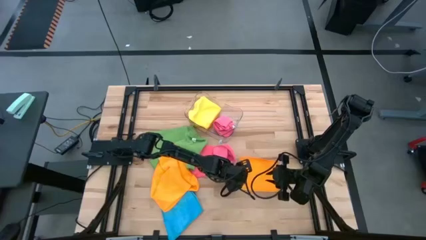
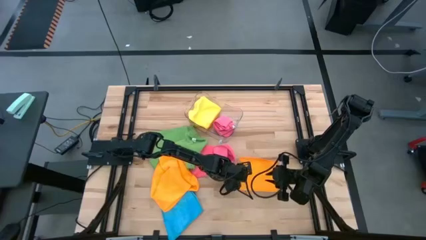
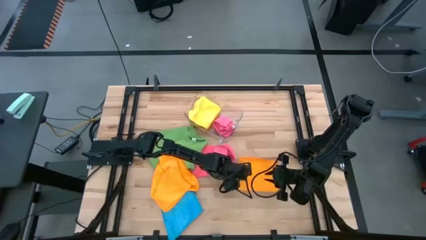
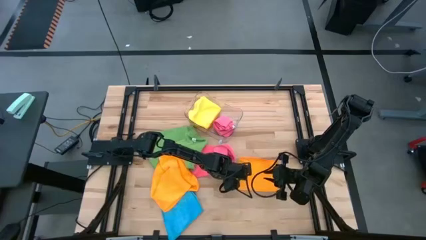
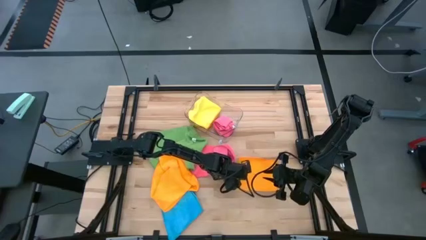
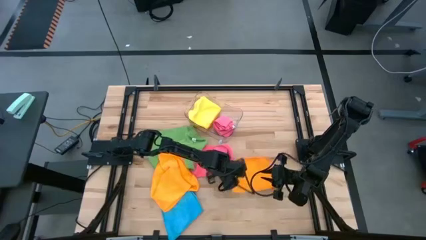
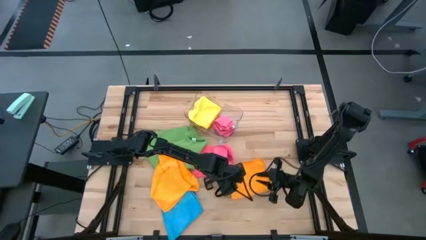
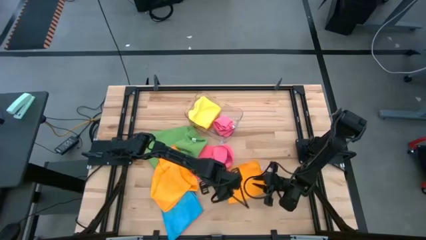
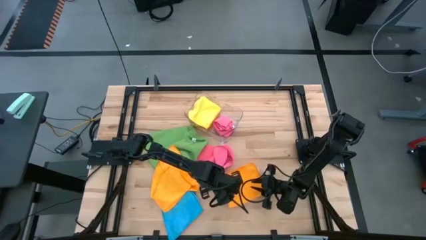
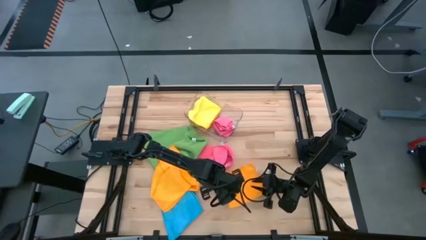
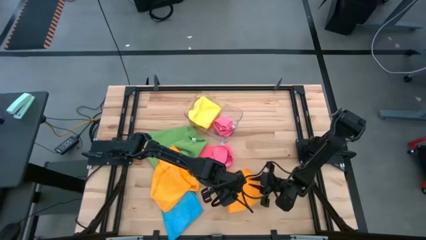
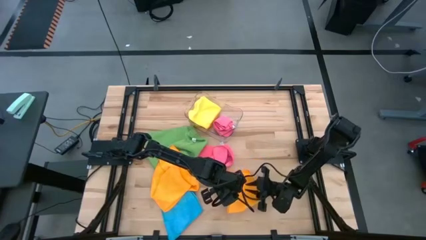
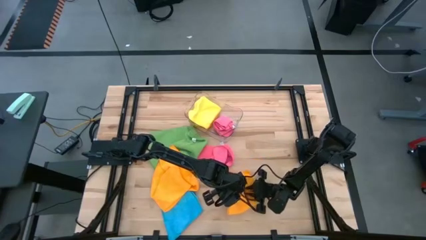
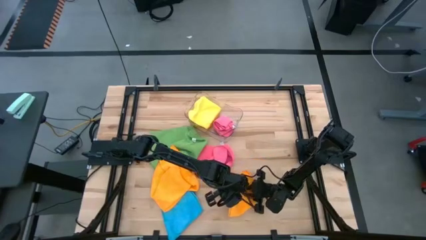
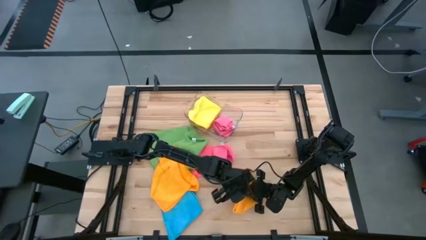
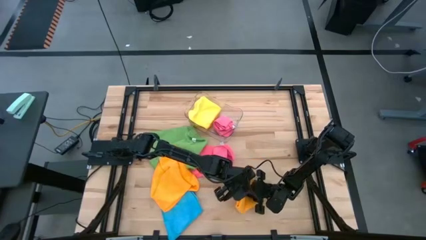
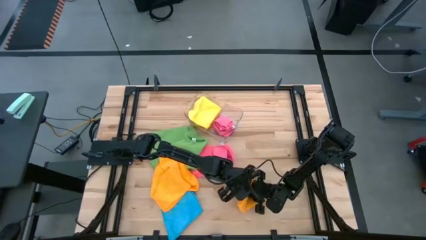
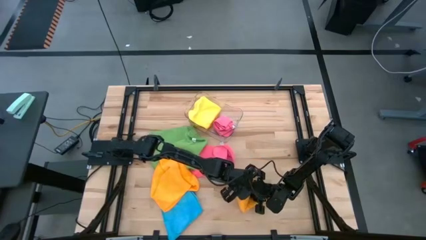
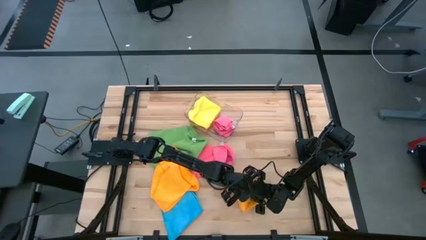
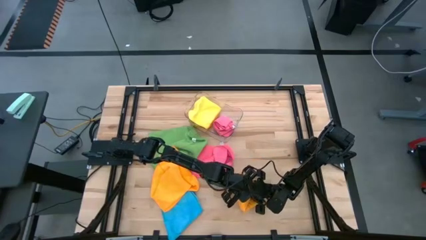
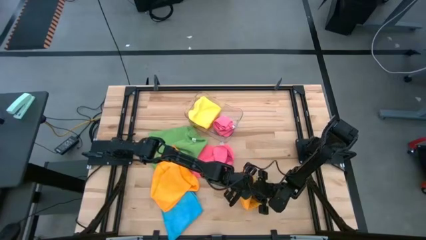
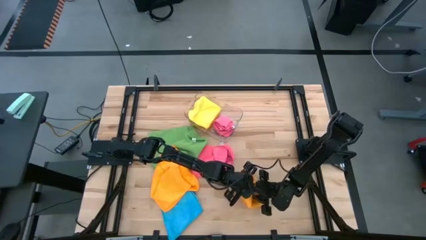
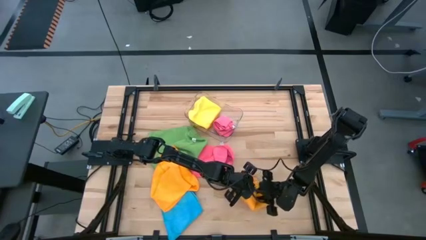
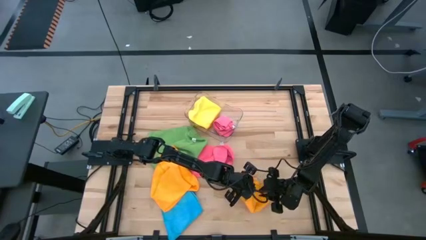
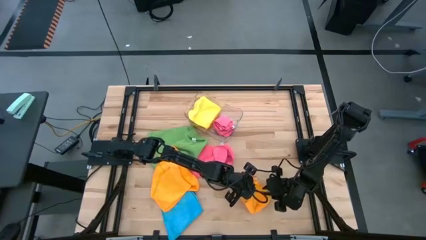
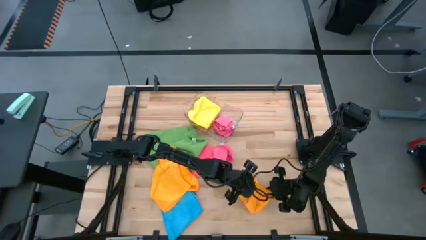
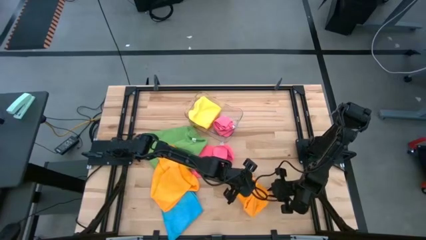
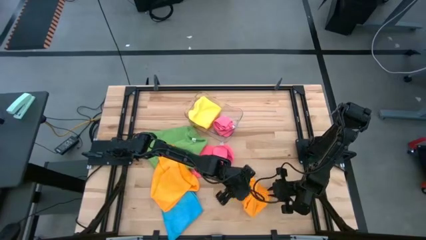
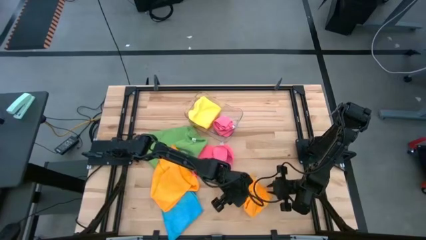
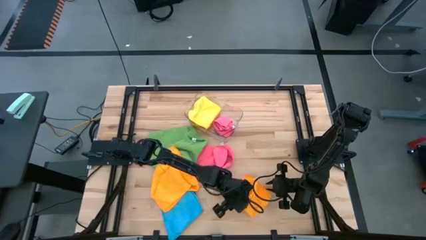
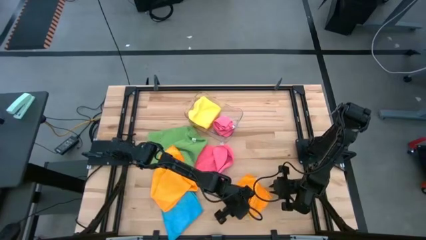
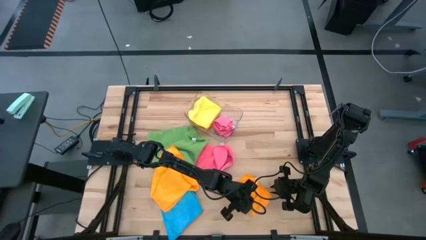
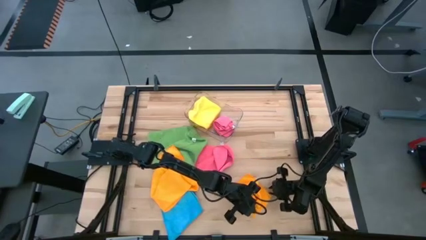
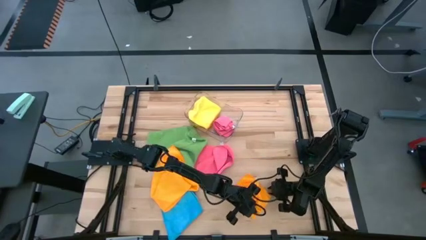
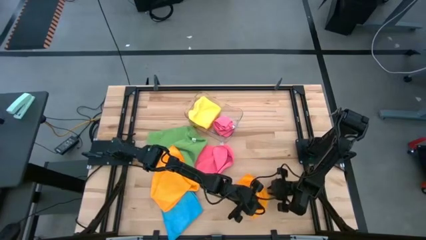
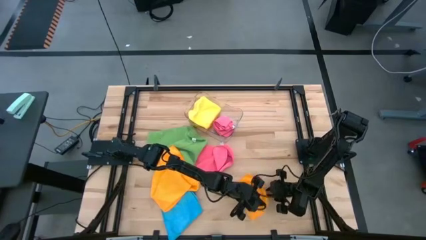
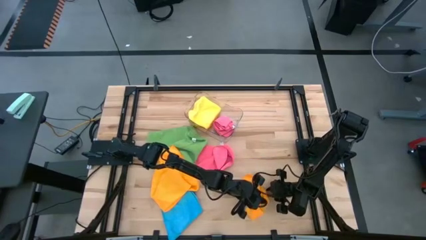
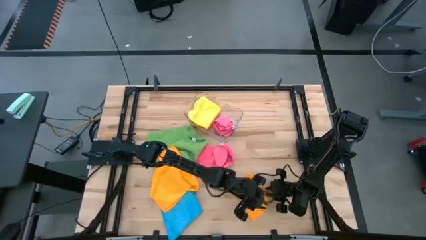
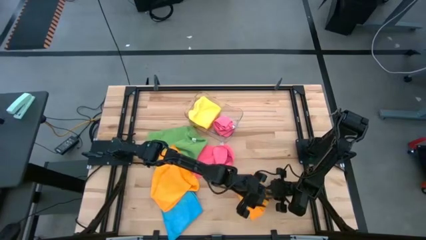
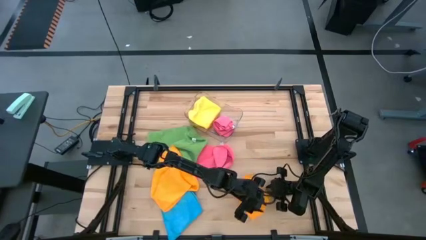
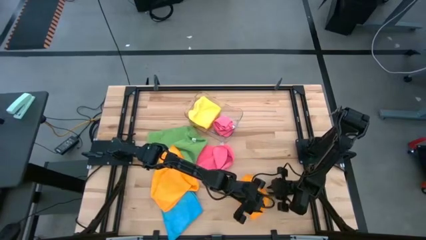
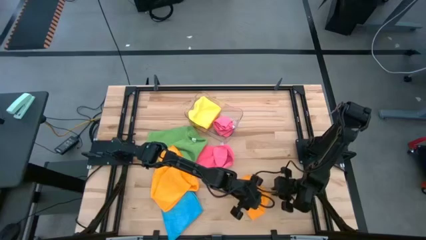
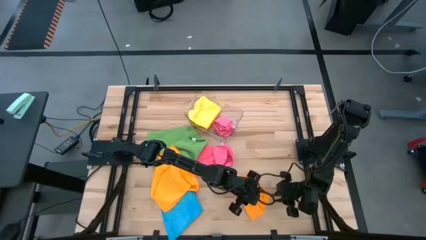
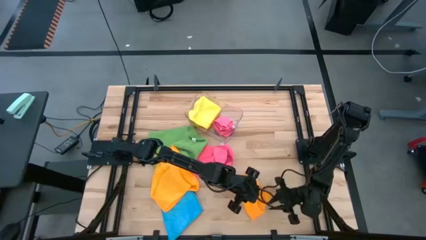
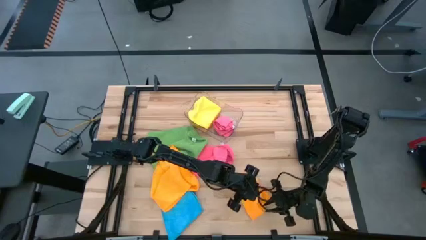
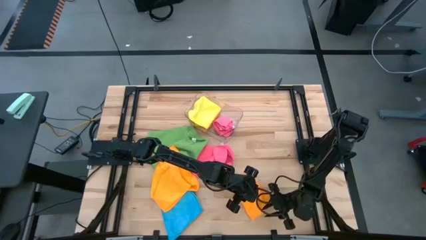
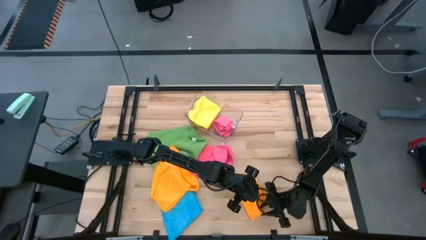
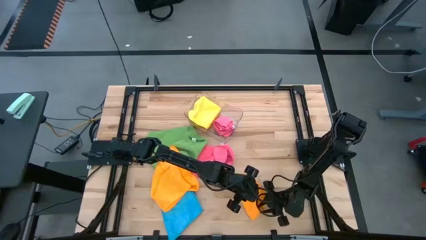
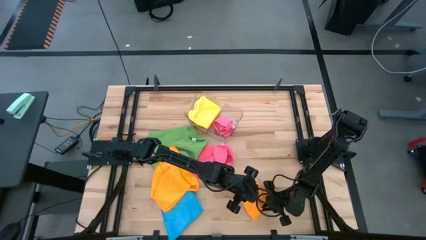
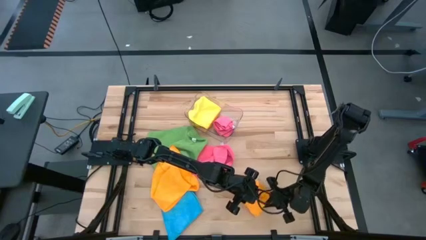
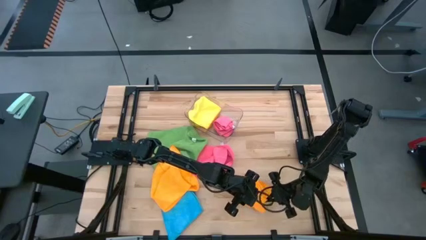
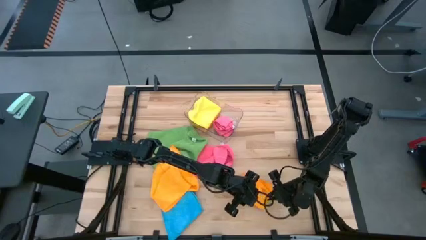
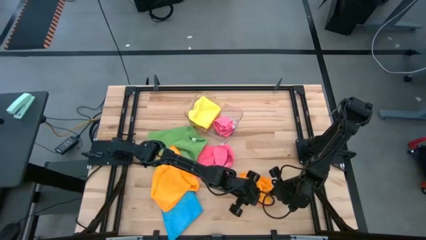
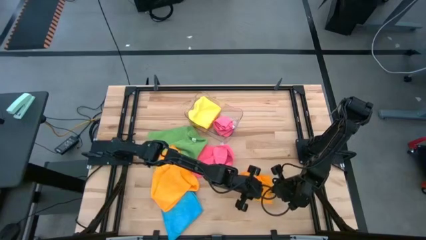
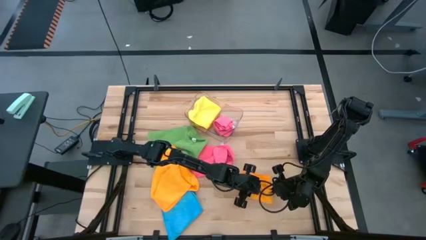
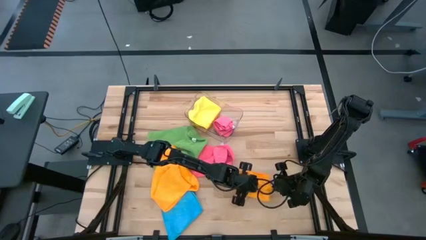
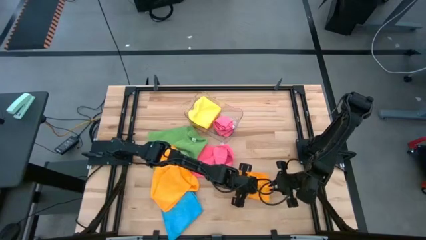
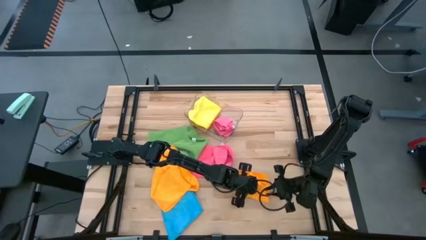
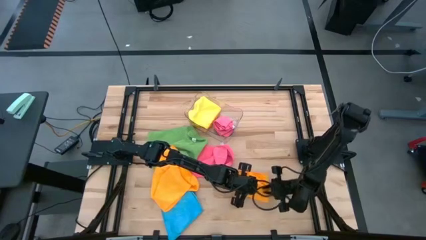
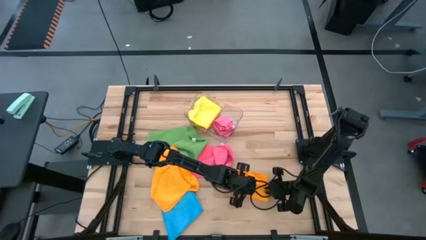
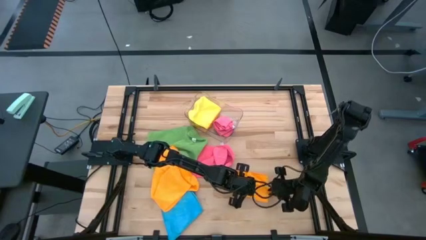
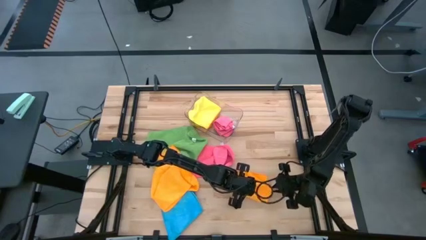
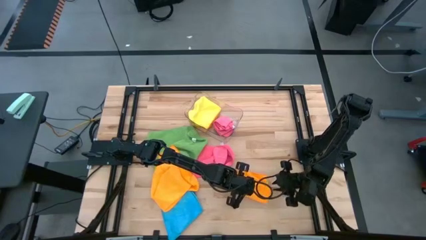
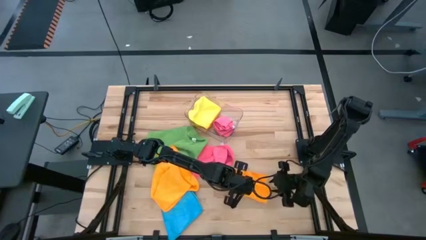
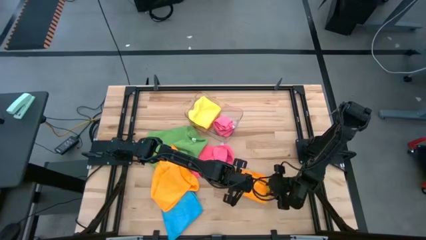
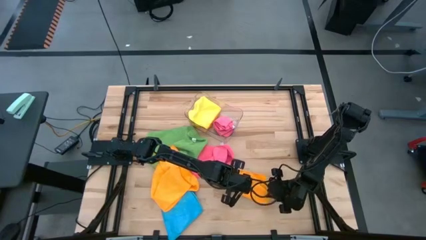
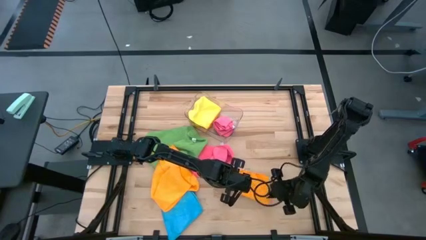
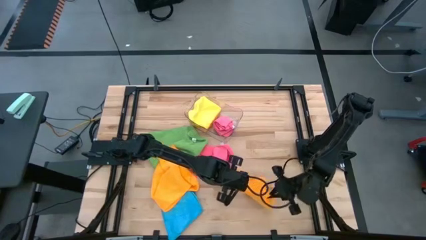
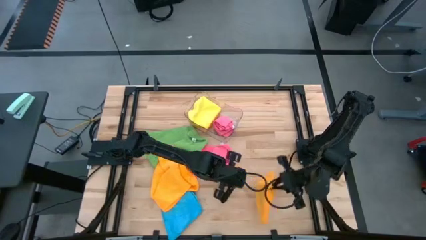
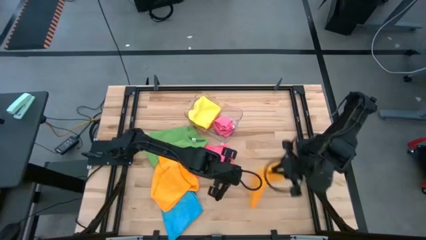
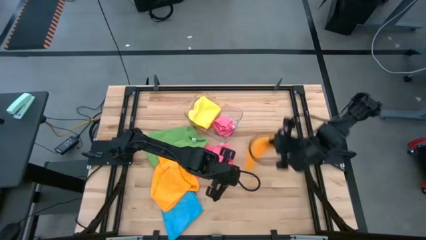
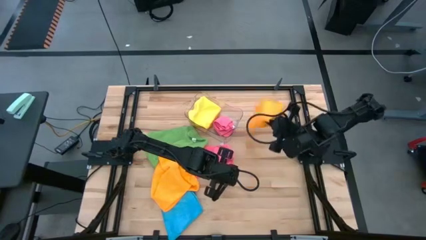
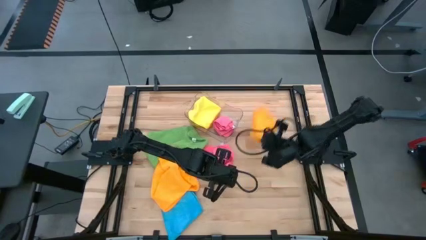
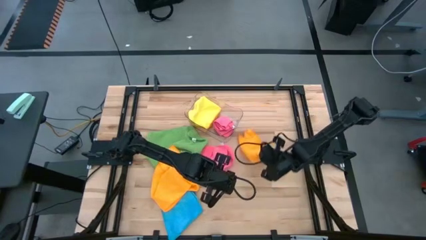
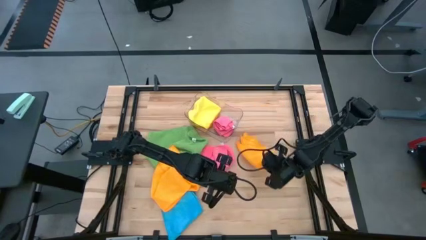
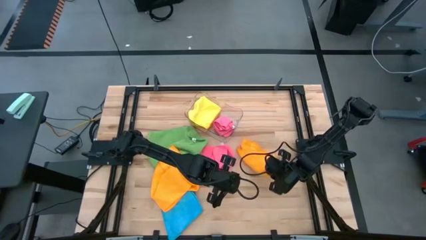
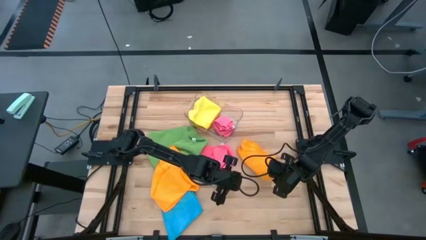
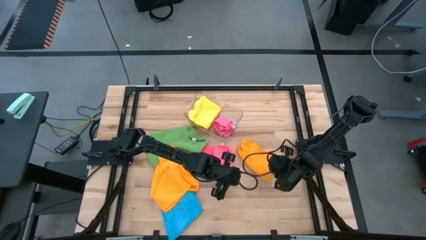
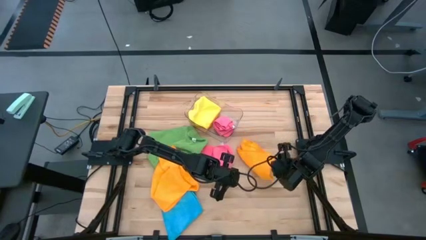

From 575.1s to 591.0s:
Task: Fold microfiber towels
Fold the right orange microfiber cloth
